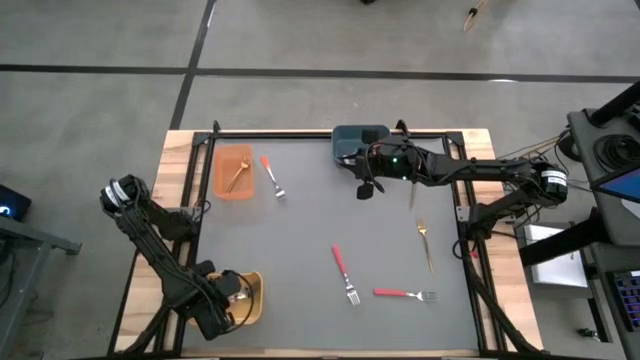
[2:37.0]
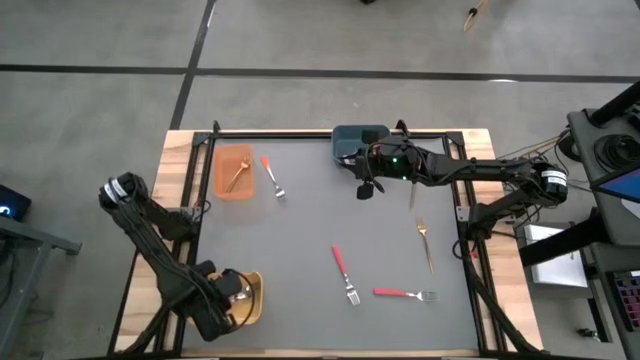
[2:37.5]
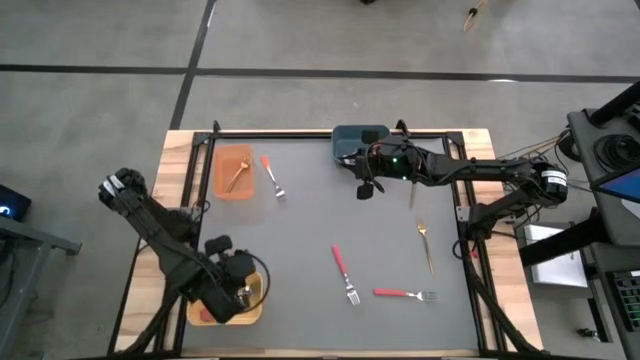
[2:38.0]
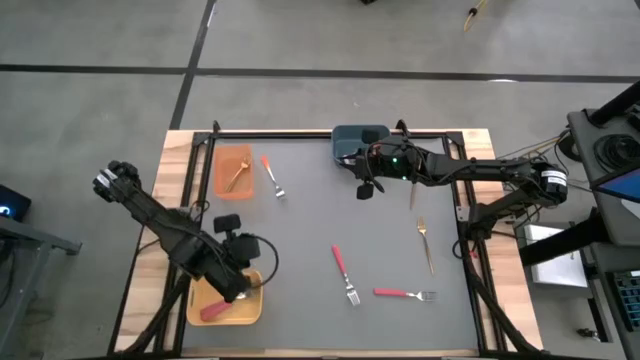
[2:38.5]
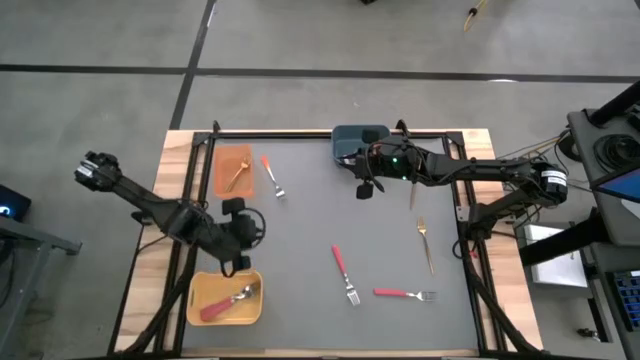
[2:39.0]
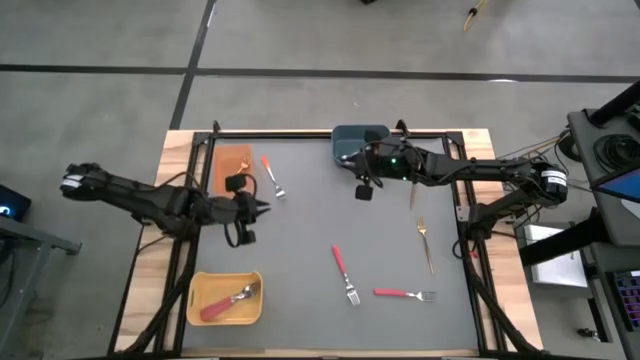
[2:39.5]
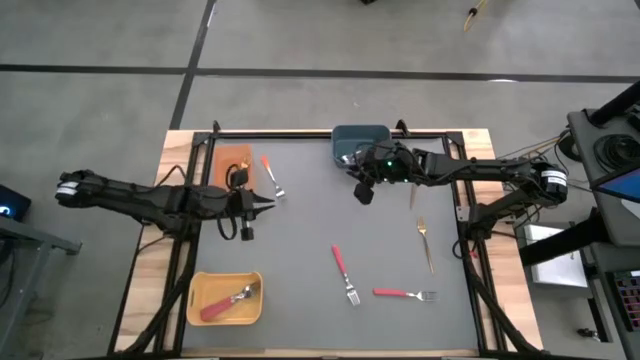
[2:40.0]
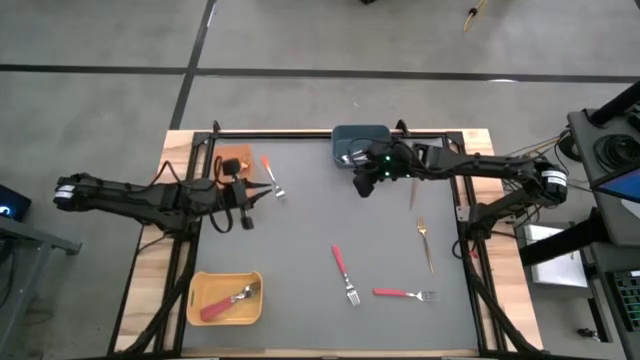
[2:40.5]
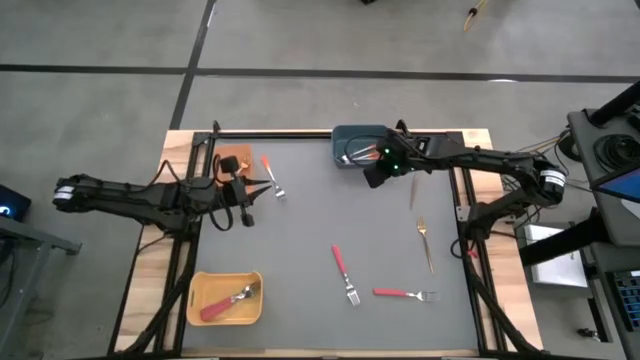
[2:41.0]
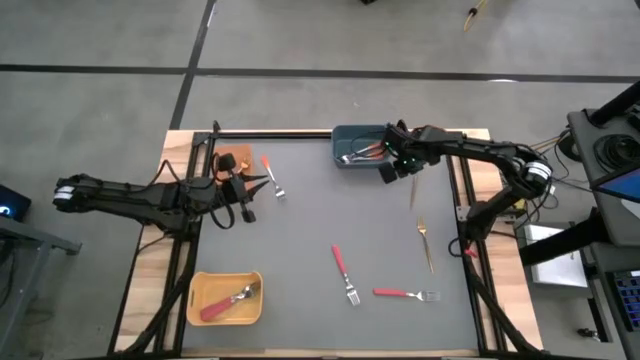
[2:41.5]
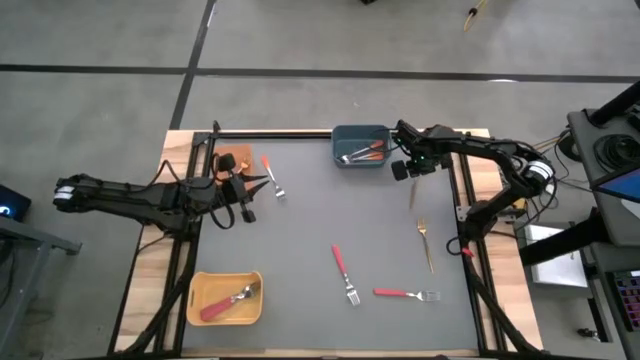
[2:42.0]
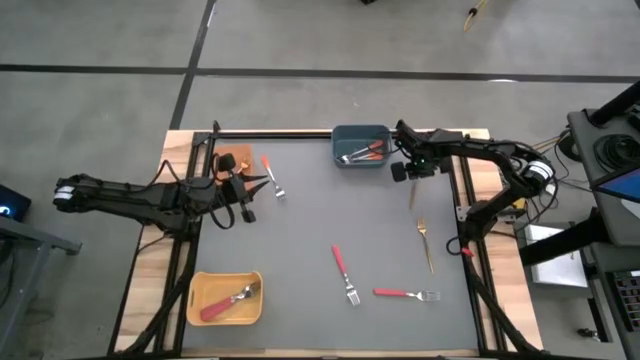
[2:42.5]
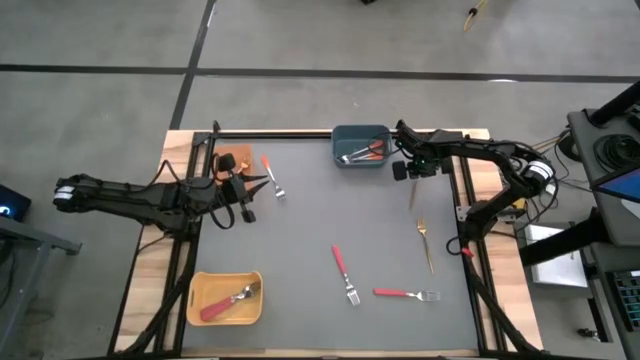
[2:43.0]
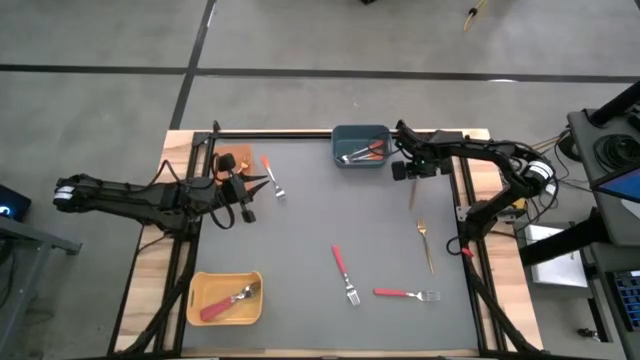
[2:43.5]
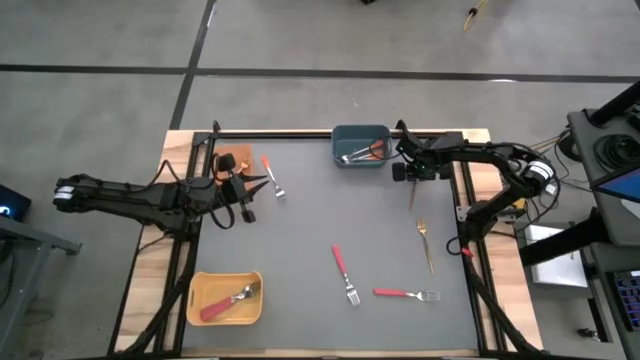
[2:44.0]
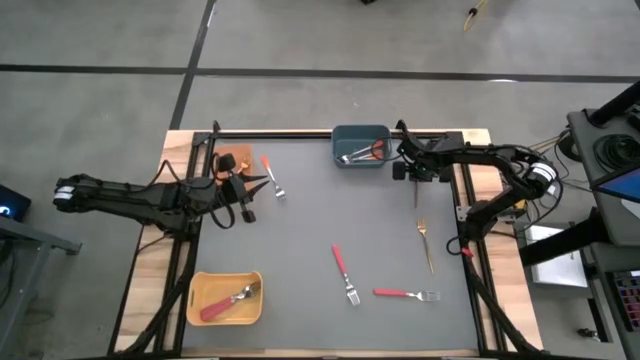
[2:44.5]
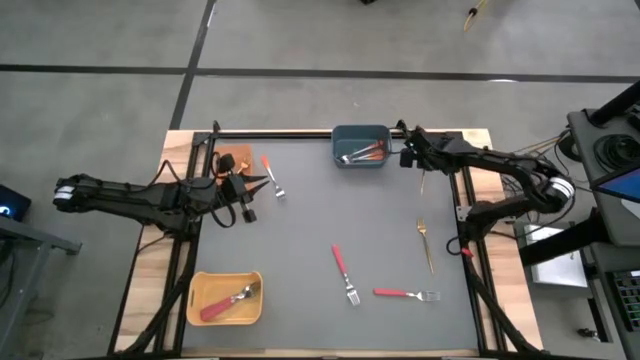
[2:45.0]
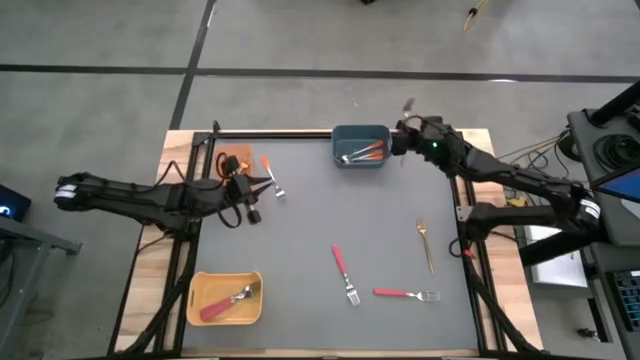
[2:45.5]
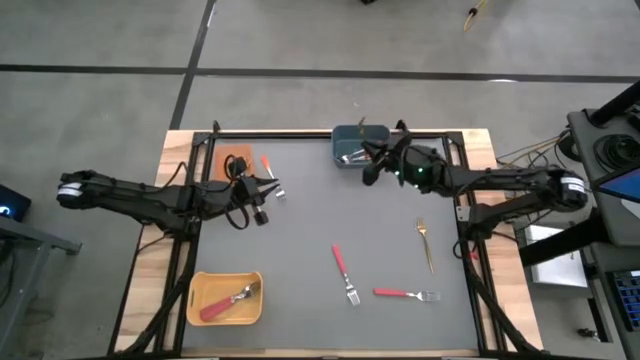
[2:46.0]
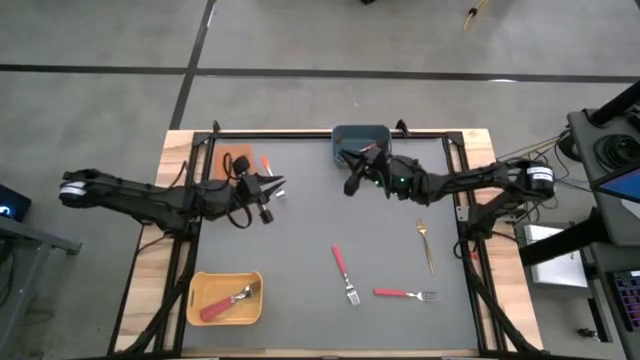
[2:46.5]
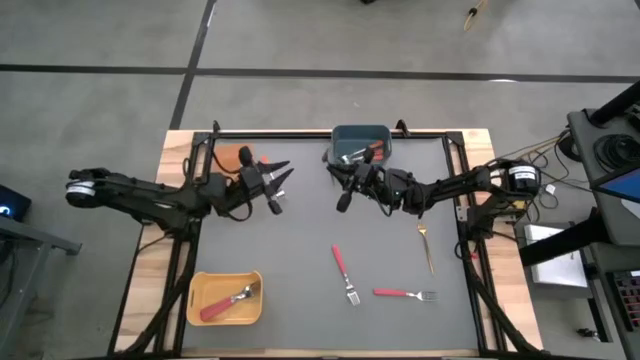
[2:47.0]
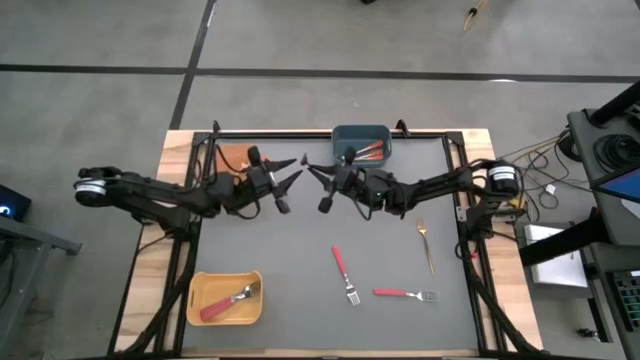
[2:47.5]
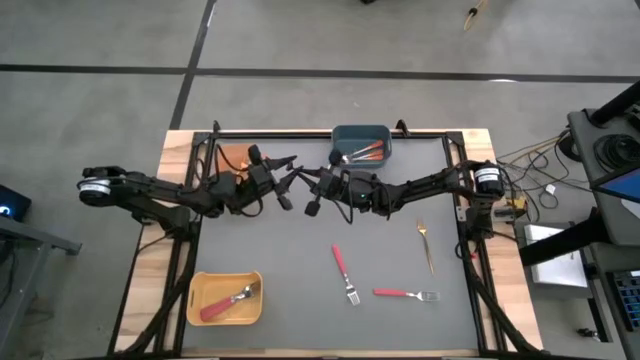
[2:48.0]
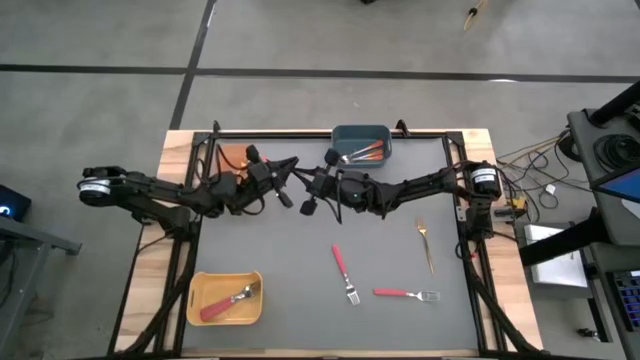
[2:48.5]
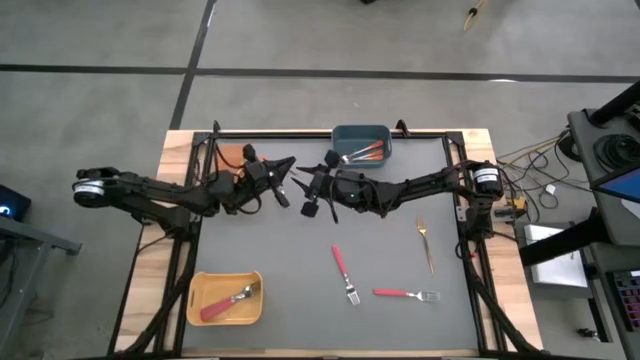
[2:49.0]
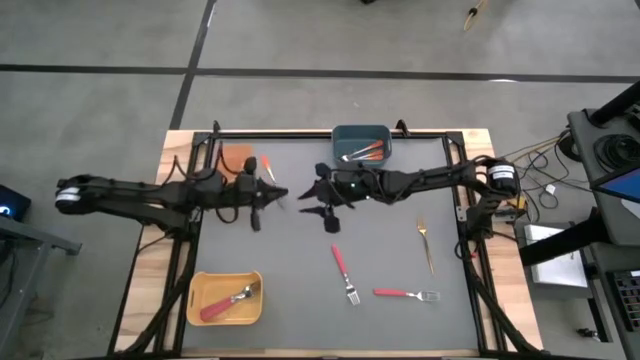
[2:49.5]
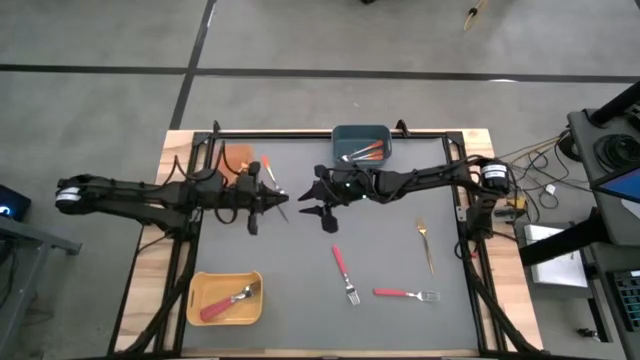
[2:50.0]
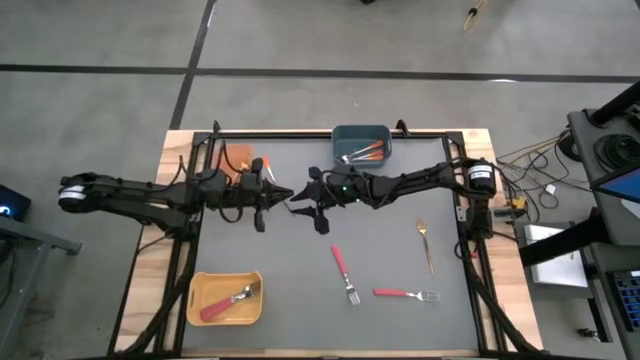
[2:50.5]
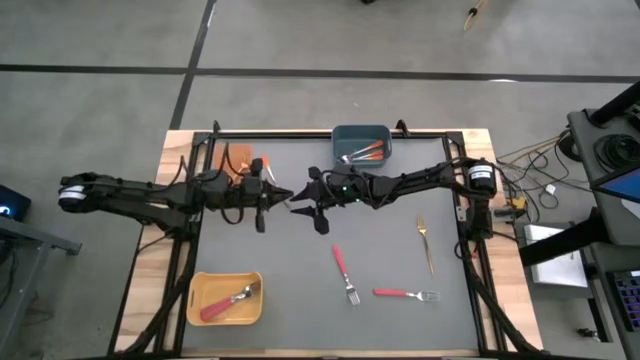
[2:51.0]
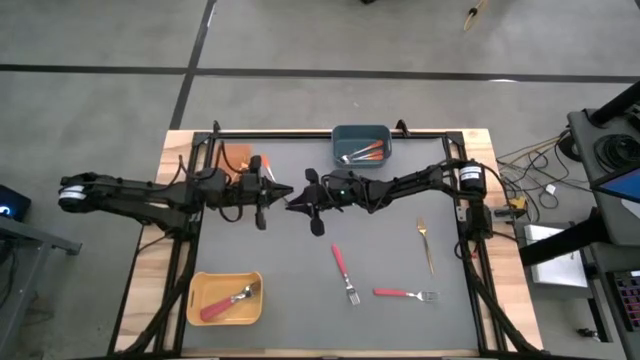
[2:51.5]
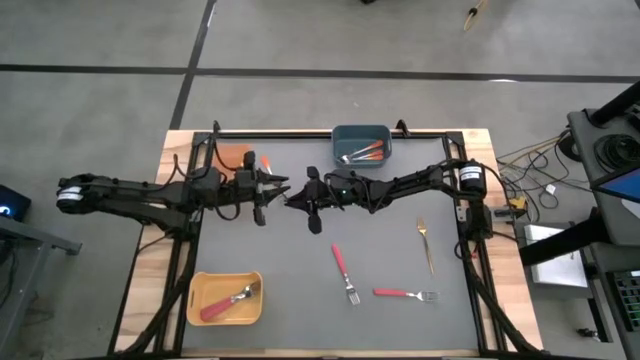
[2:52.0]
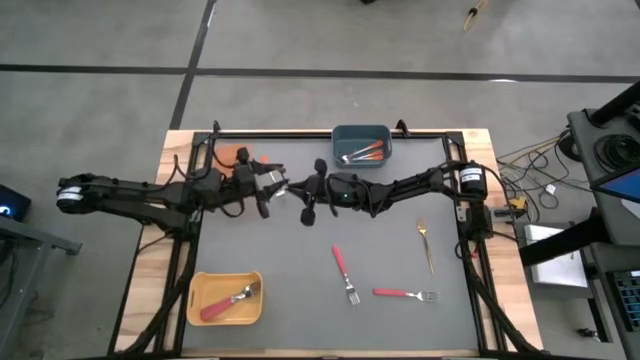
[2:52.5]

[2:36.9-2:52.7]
Task: Sort silverware by color (type)
Put the gold fork into the orange bin

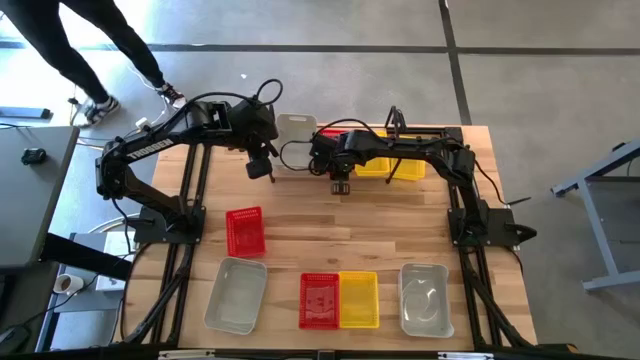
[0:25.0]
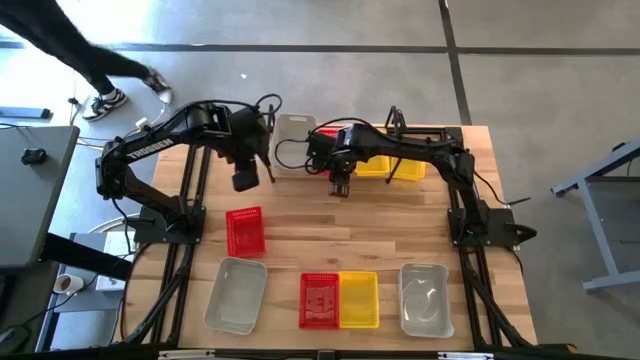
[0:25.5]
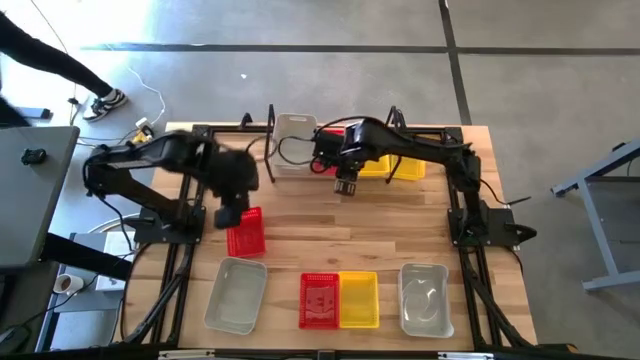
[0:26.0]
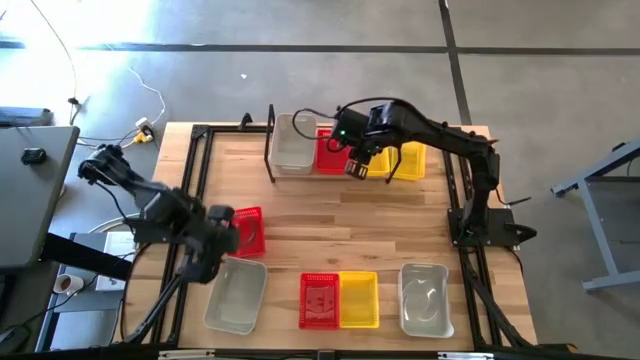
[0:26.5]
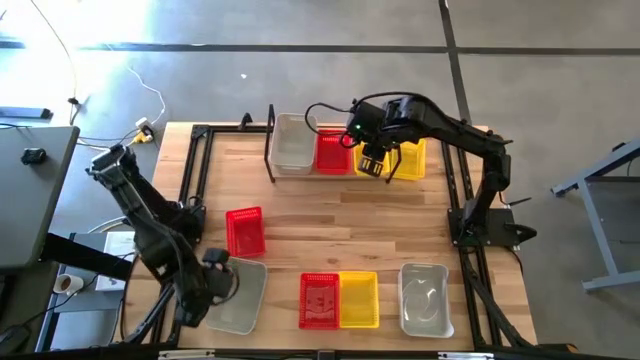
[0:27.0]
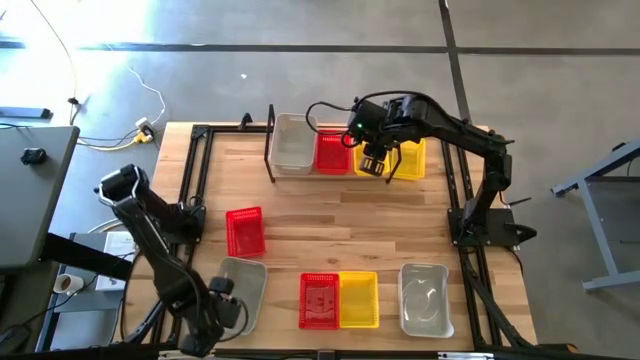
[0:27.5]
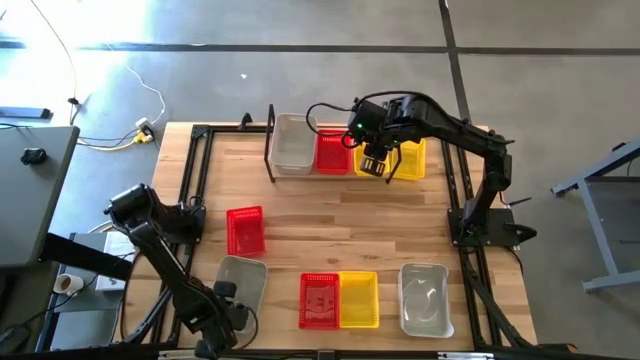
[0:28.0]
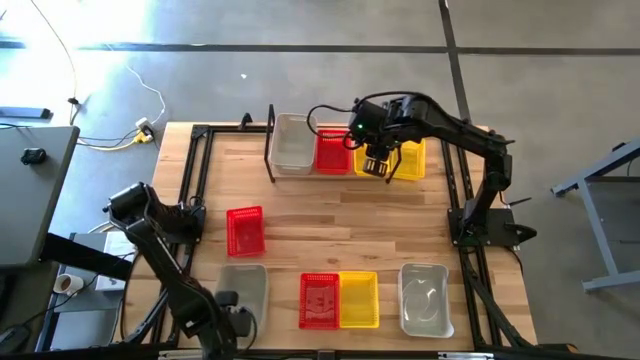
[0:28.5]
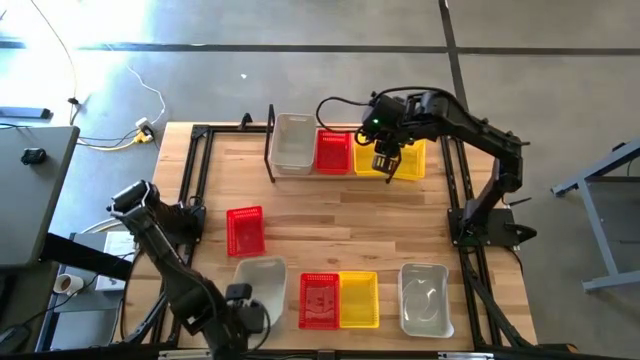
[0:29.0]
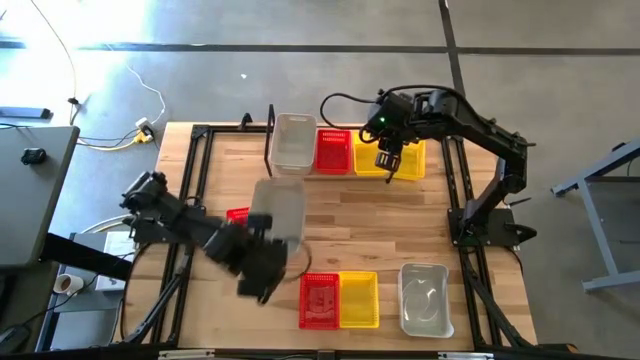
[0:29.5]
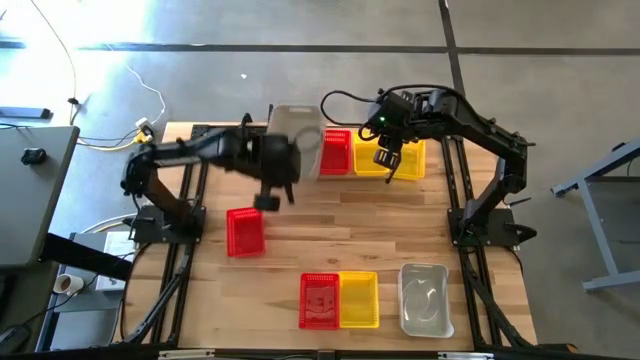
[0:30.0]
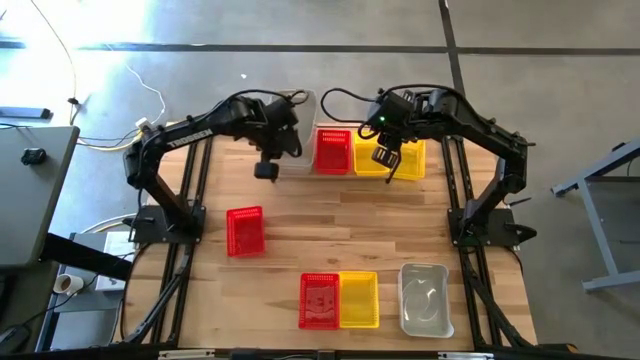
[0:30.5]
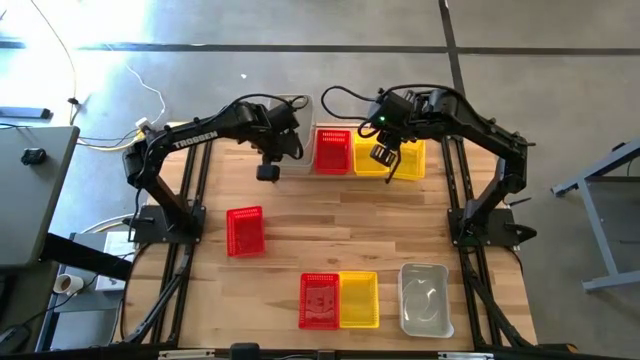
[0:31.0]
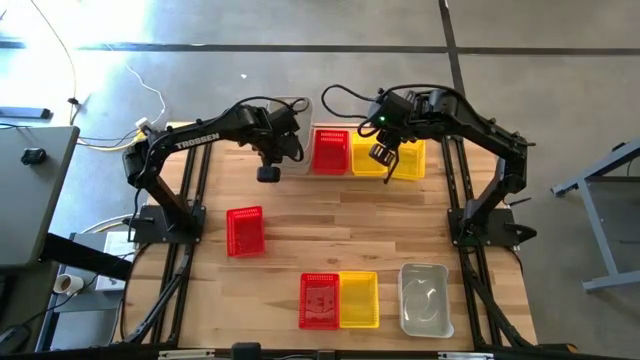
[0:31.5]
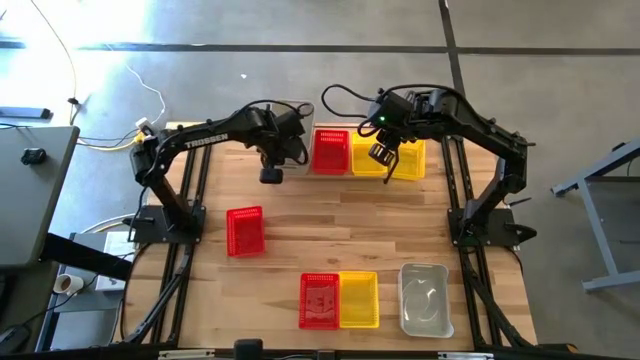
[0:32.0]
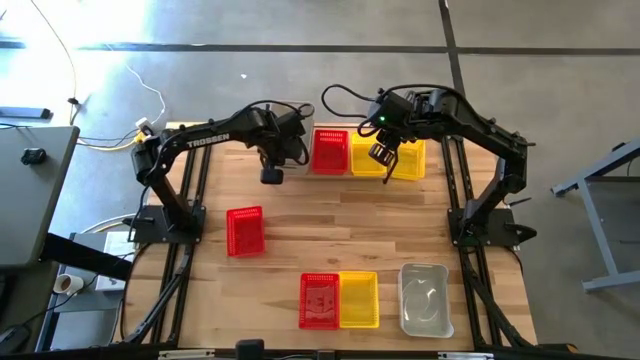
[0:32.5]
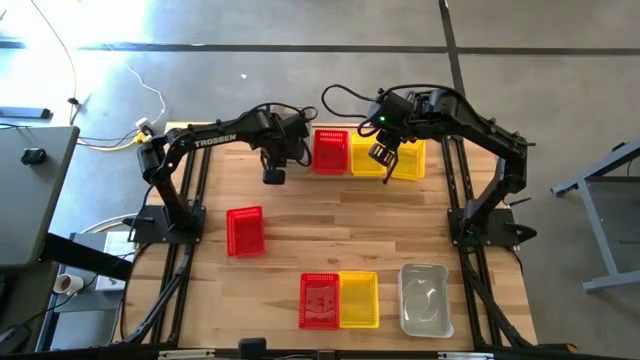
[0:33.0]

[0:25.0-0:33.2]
Task: Stack baskets on shelf by color
Stack the left white bin on top of the white bin
